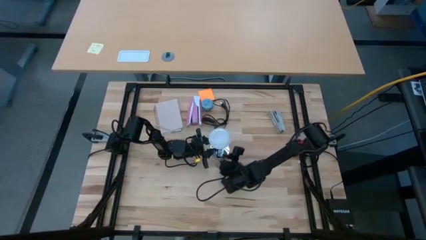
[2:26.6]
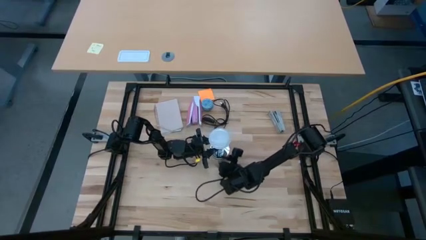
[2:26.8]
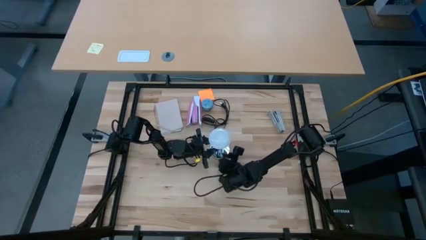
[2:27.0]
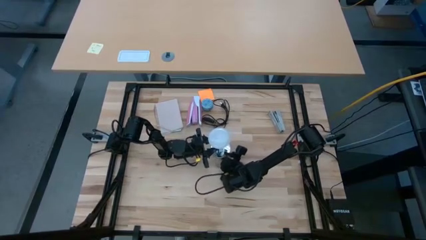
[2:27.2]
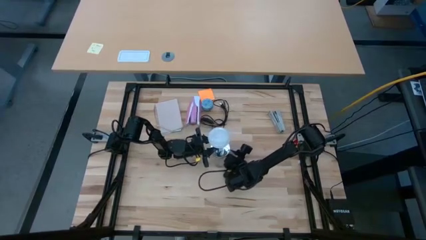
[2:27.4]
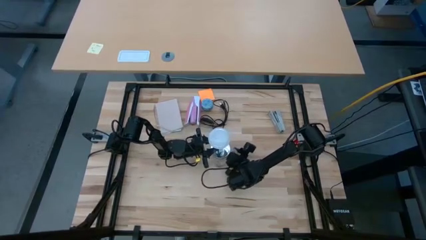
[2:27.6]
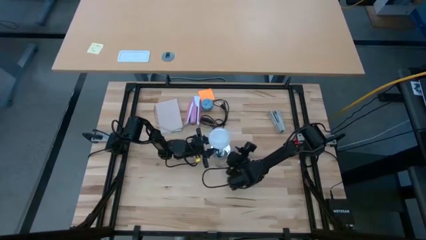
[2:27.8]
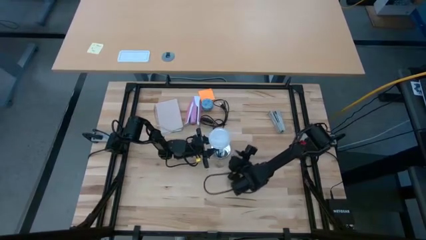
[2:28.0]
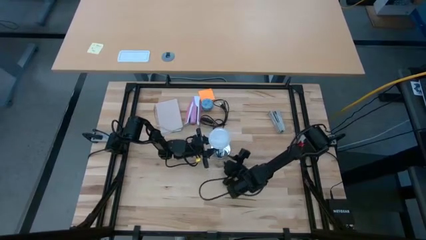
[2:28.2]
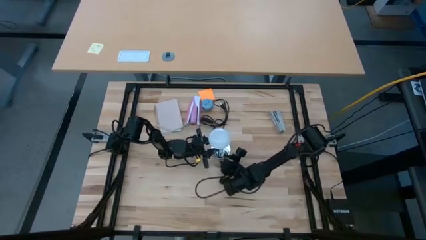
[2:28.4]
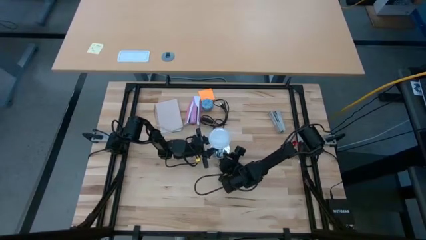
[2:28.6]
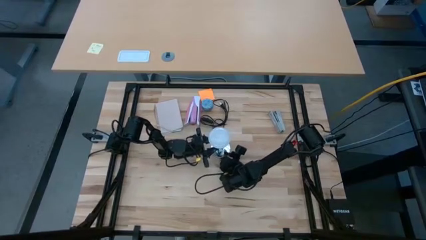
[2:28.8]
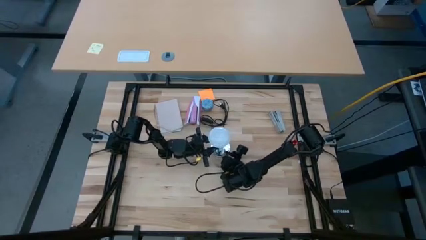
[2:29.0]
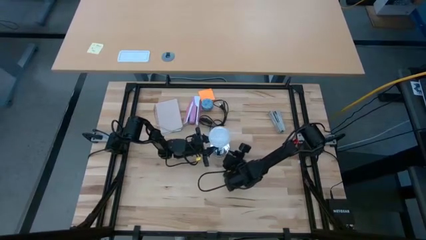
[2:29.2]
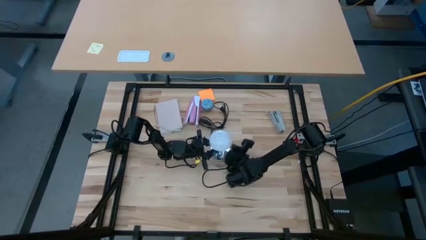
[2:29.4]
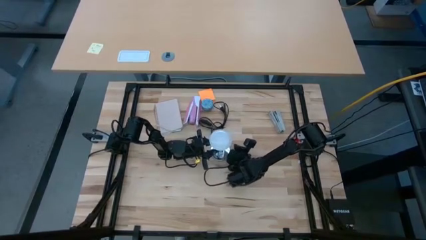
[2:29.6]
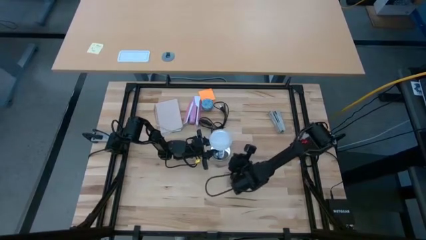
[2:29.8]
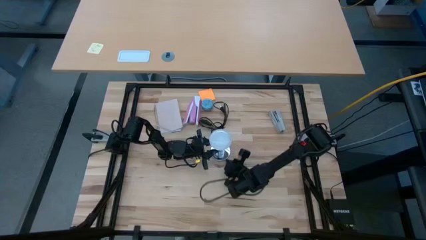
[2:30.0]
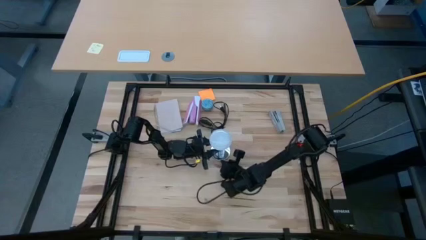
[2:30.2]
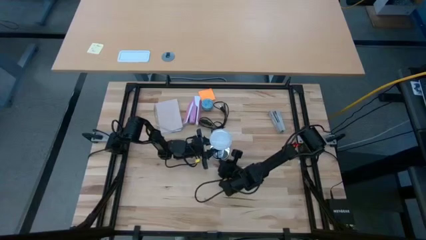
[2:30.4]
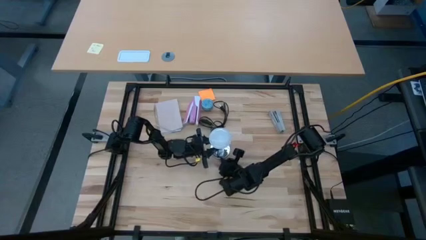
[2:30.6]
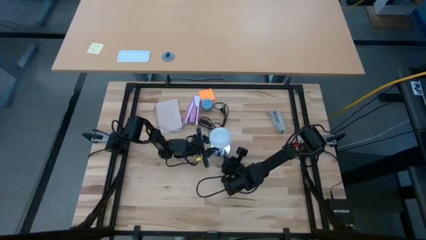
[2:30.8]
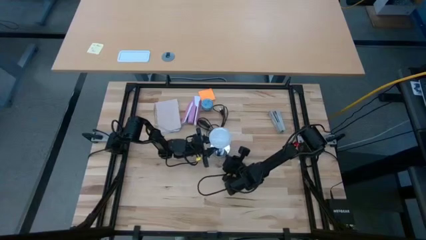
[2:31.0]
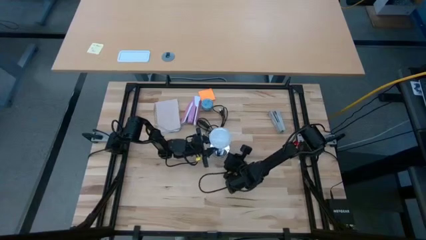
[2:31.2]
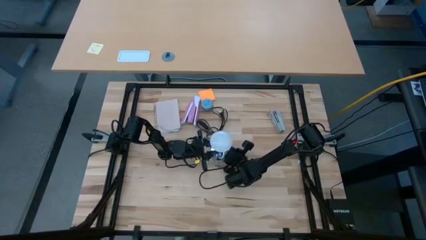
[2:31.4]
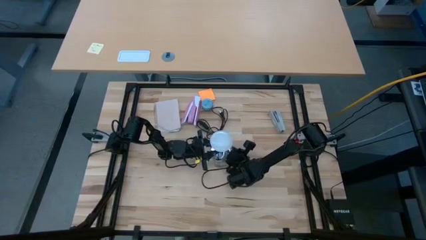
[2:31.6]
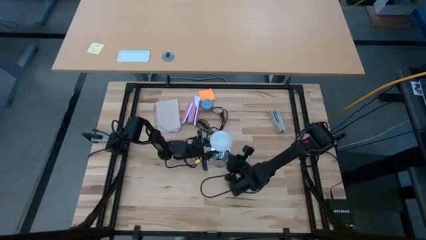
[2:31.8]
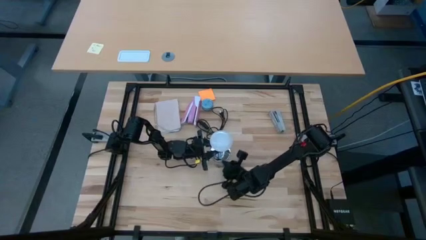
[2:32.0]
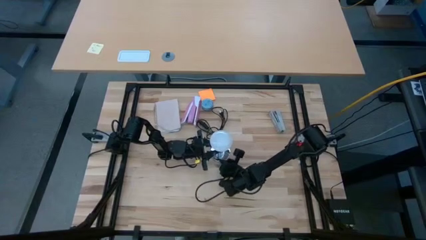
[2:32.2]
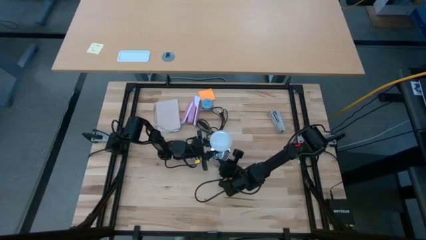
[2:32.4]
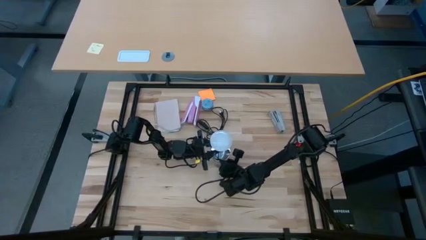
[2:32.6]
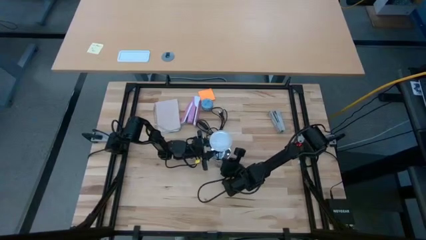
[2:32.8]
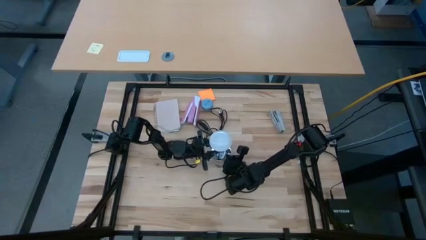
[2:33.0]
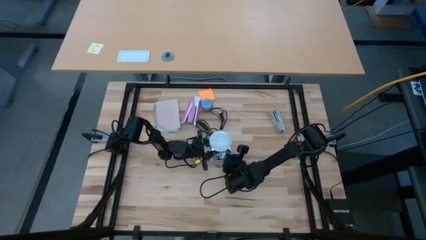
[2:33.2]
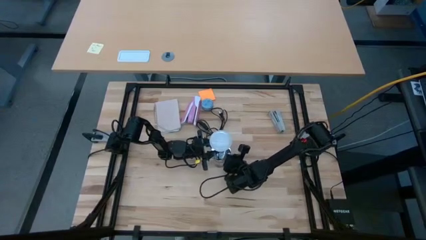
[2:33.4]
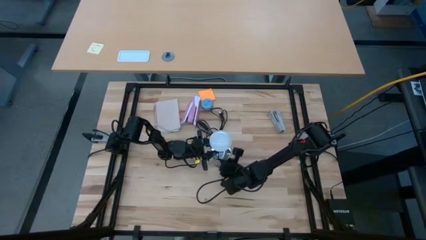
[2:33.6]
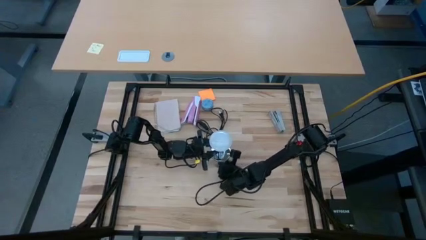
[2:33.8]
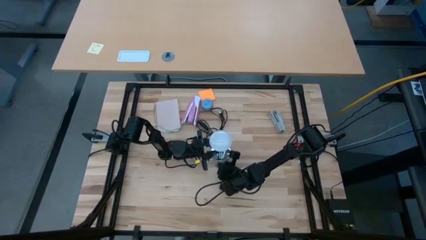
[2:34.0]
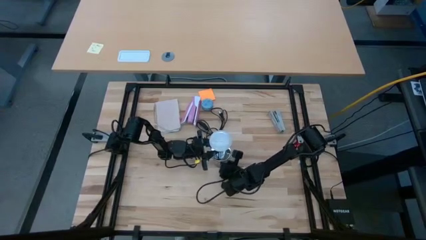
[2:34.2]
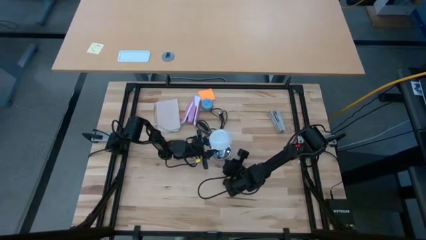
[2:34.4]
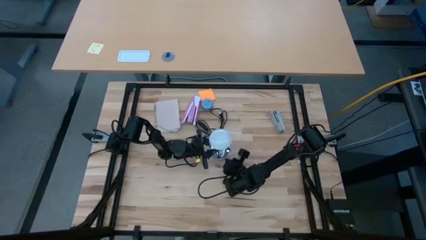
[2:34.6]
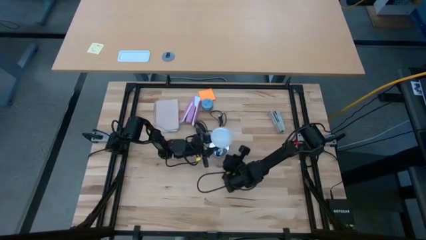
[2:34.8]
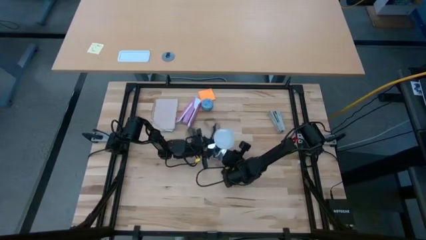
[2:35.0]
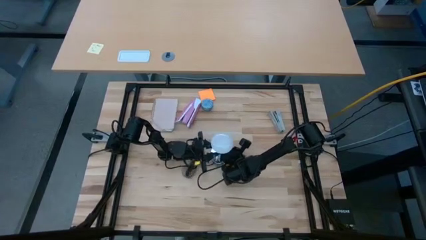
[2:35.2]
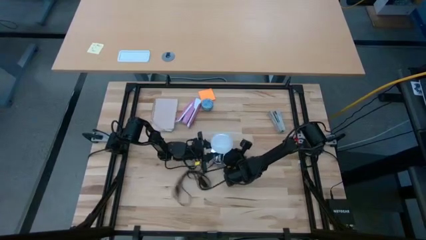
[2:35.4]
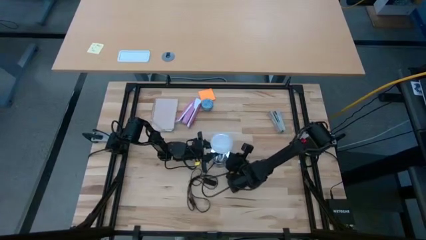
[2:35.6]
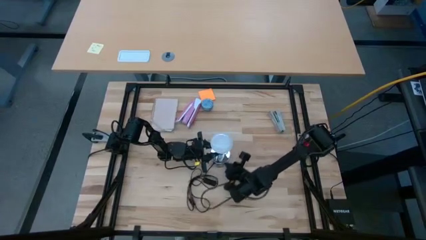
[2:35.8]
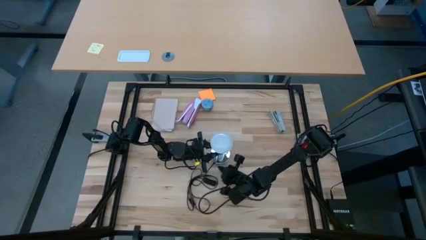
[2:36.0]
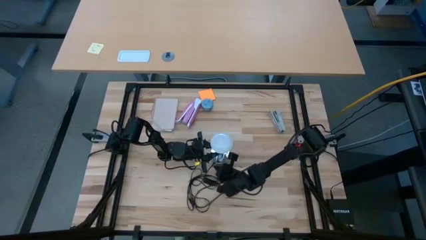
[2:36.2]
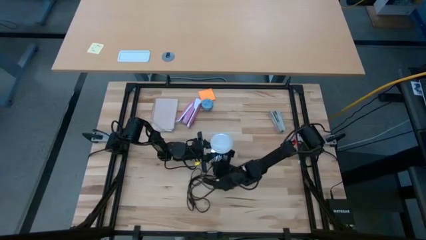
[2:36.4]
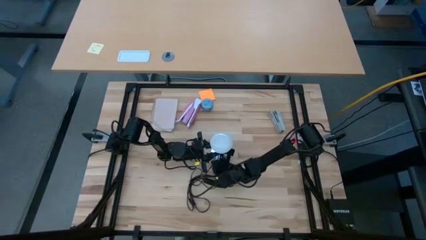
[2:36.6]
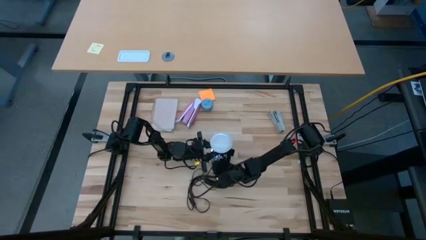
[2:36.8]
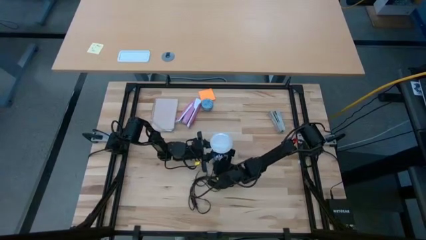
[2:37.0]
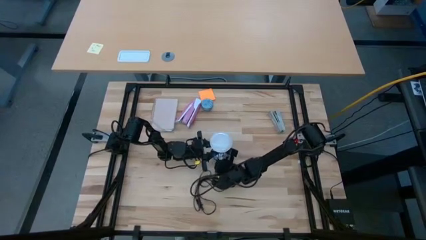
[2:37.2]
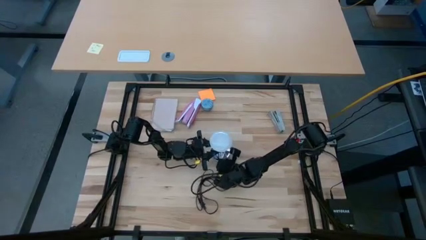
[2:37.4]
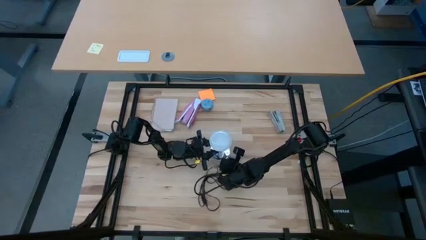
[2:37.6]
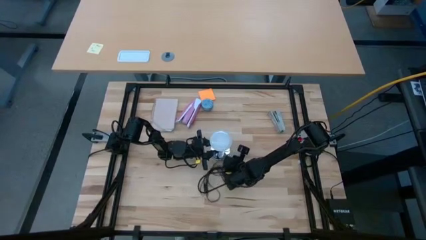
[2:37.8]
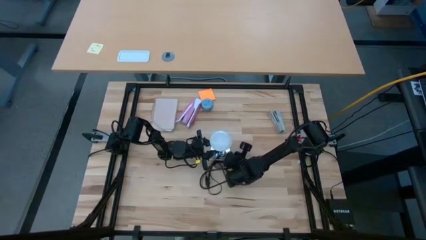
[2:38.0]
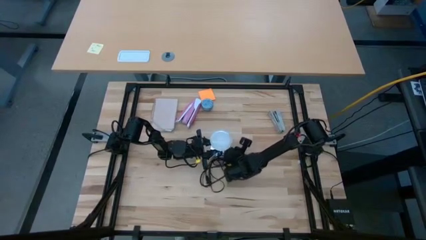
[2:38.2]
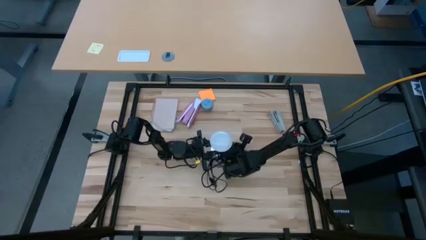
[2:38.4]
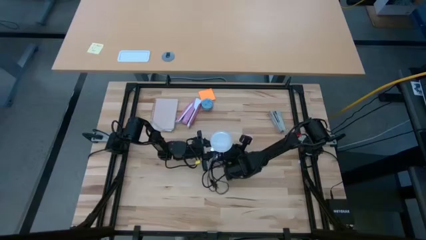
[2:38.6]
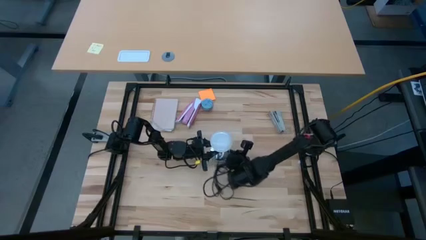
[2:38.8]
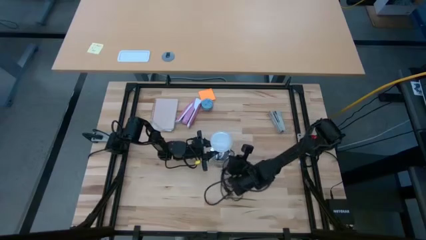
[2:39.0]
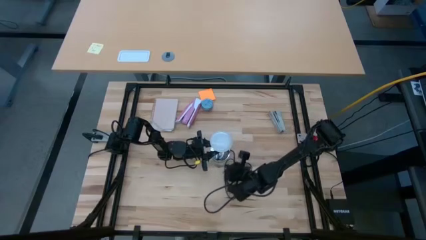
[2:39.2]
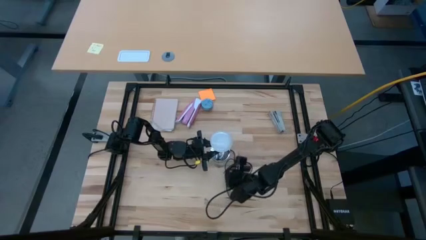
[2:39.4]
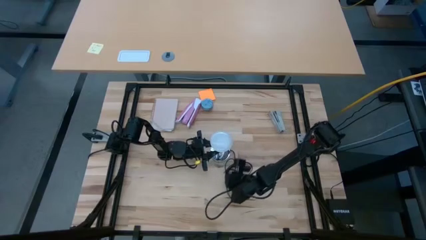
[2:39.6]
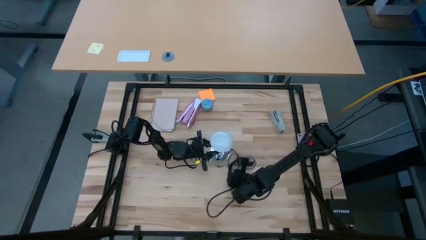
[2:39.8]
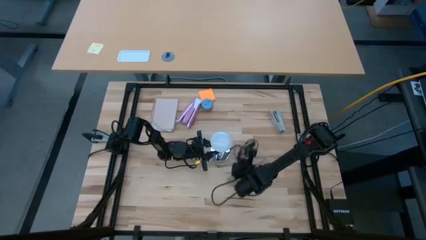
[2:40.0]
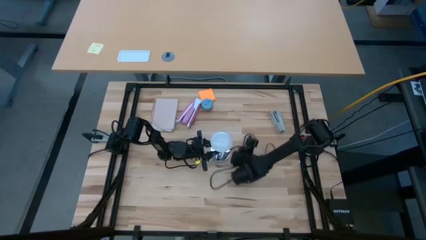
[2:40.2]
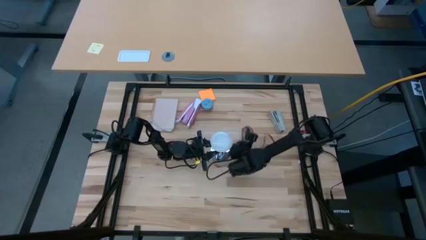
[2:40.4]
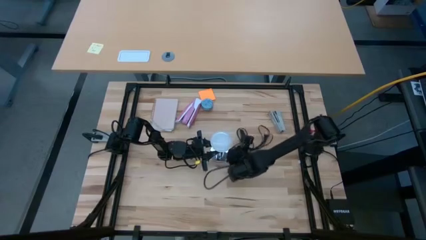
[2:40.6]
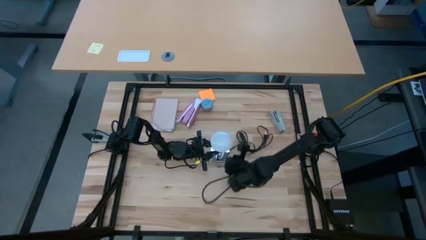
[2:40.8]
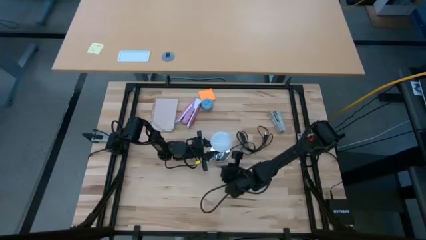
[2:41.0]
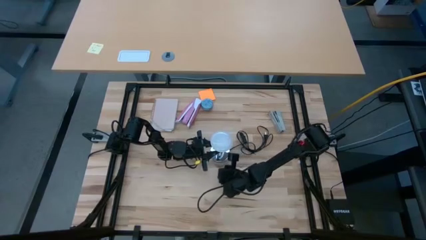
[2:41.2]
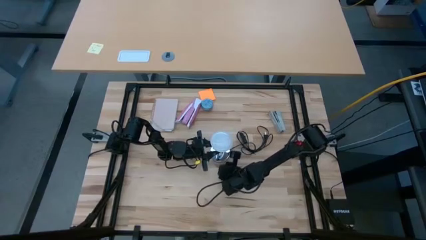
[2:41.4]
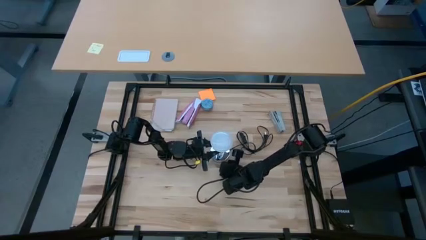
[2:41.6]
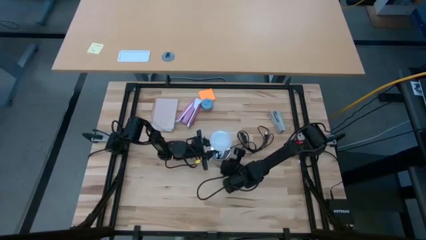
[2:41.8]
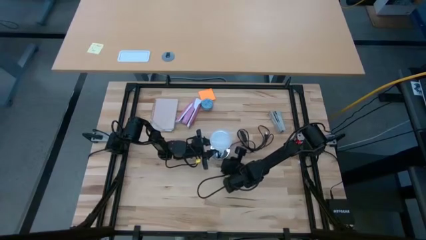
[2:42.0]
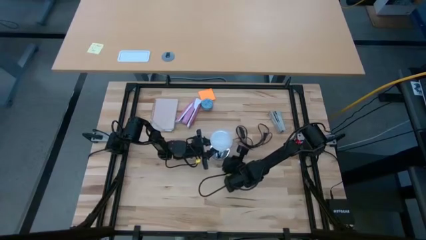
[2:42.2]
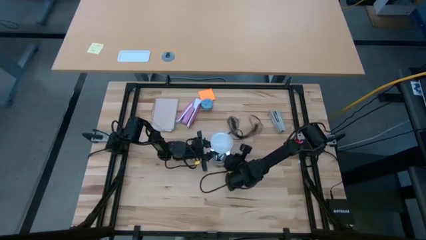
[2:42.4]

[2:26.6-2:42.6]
Task: Screw lightbulb
Insert the lightbulb into the lamp
